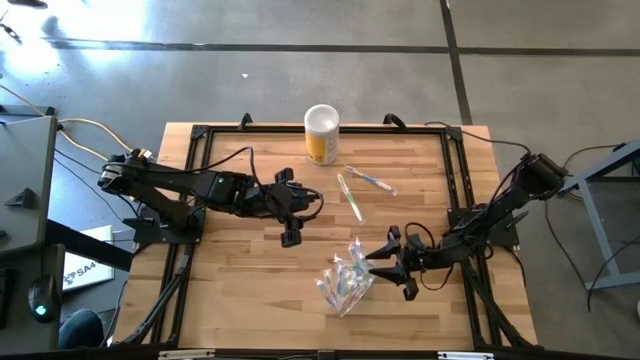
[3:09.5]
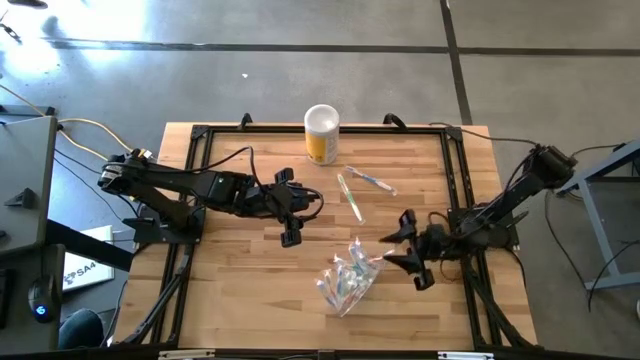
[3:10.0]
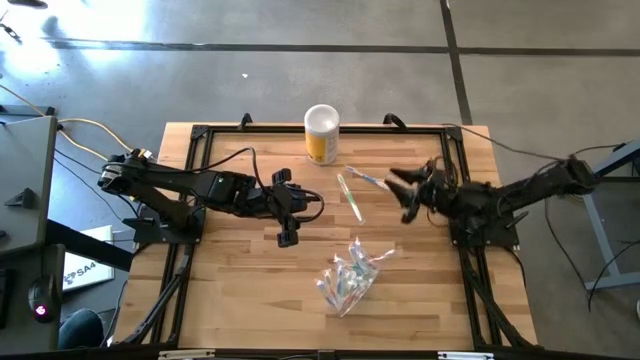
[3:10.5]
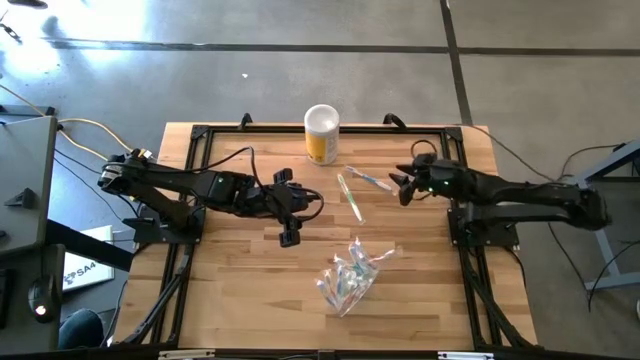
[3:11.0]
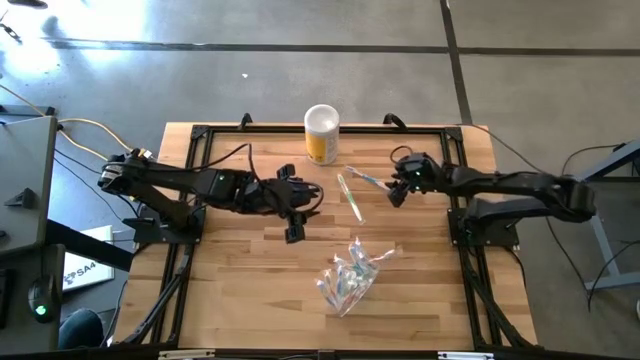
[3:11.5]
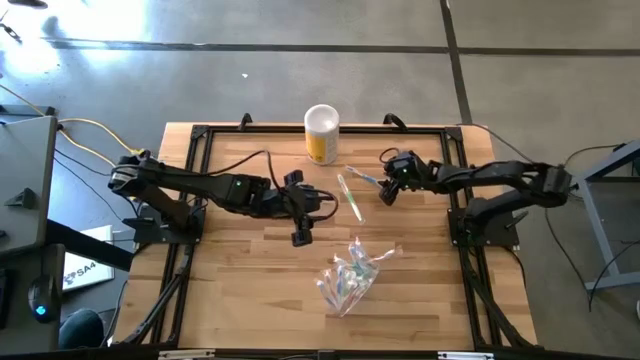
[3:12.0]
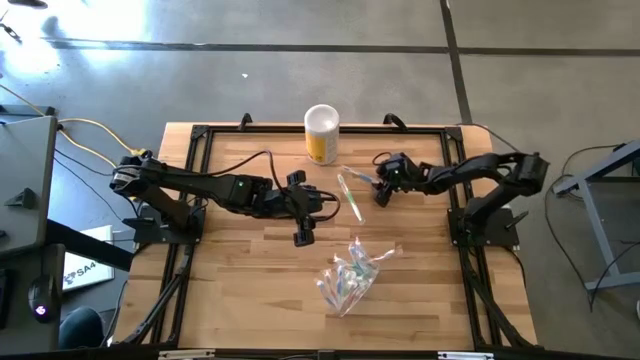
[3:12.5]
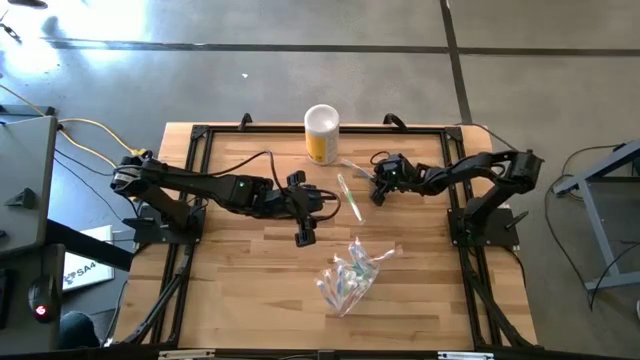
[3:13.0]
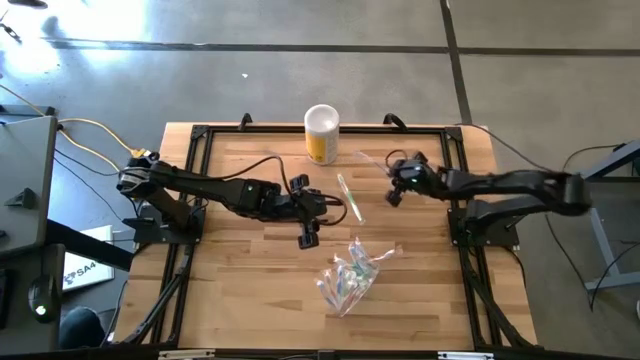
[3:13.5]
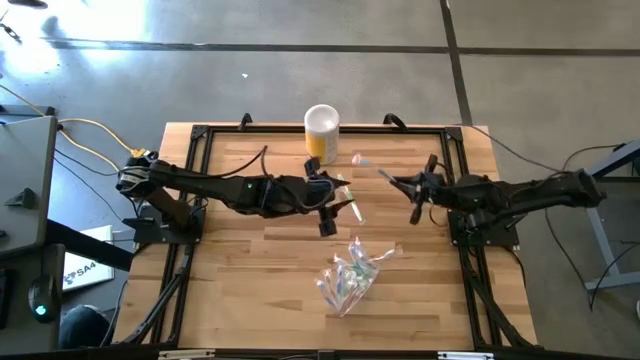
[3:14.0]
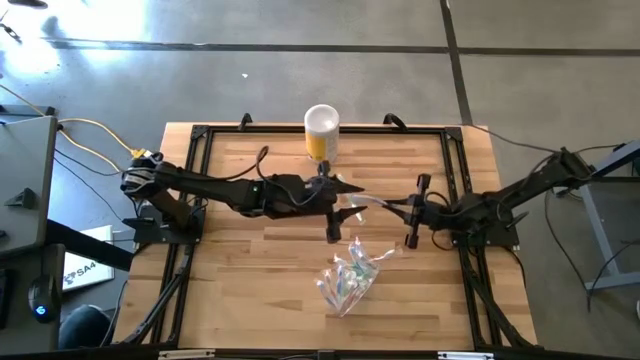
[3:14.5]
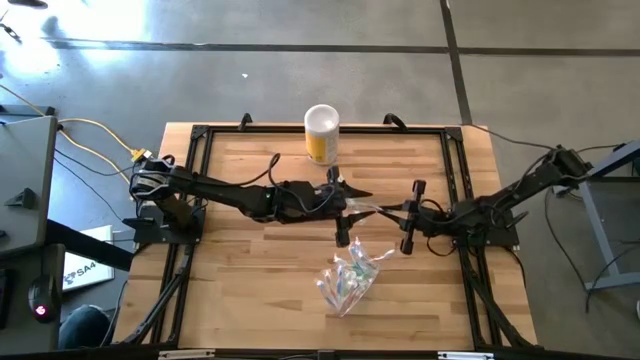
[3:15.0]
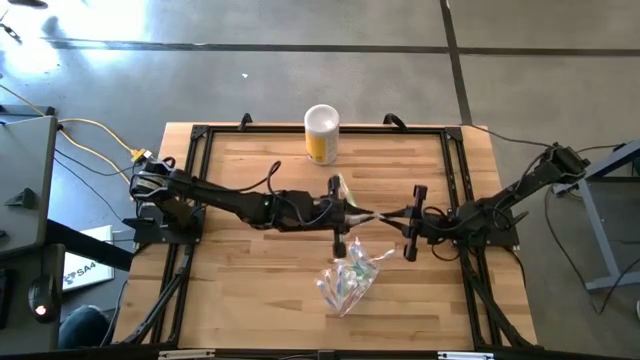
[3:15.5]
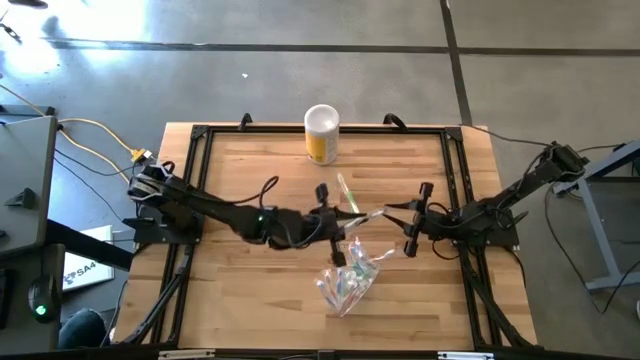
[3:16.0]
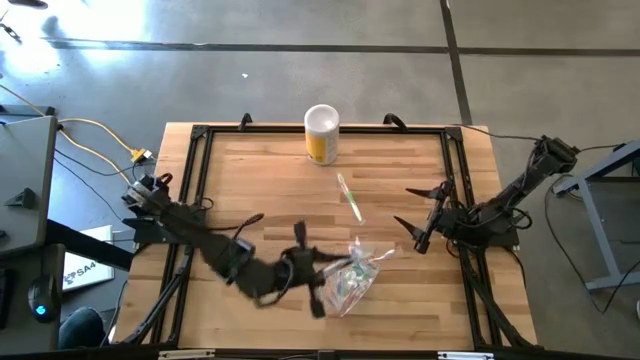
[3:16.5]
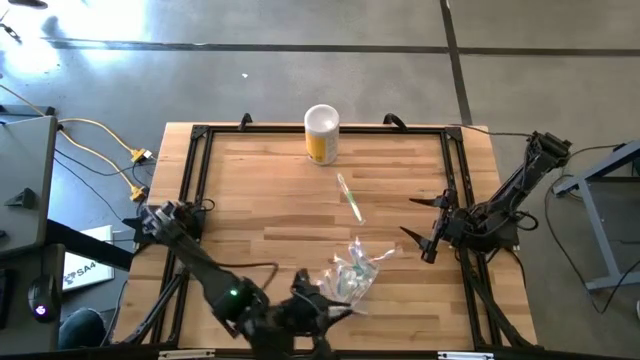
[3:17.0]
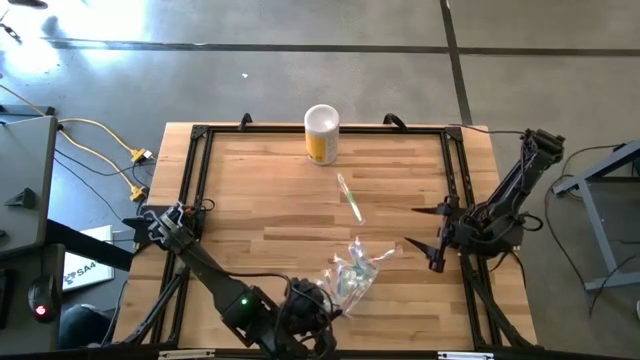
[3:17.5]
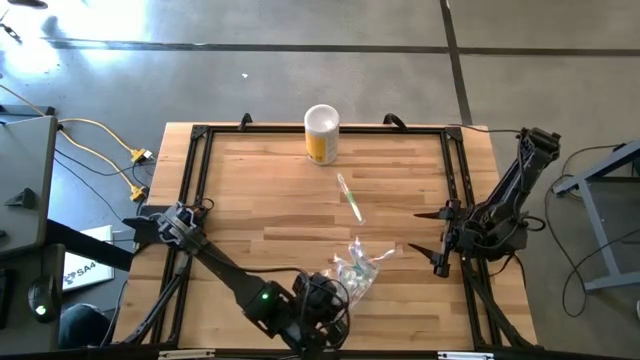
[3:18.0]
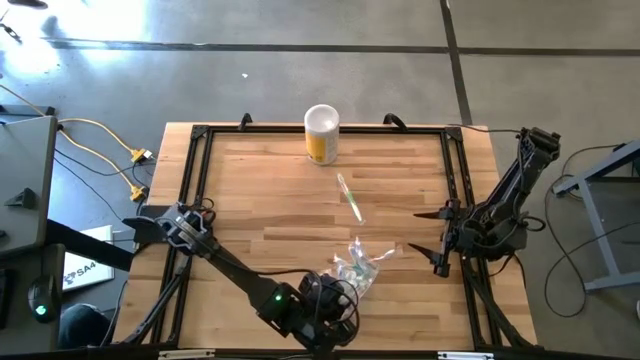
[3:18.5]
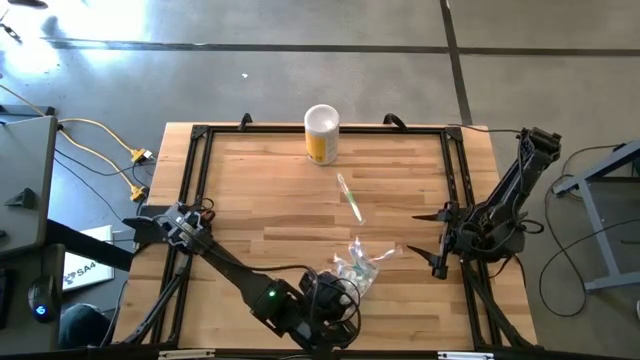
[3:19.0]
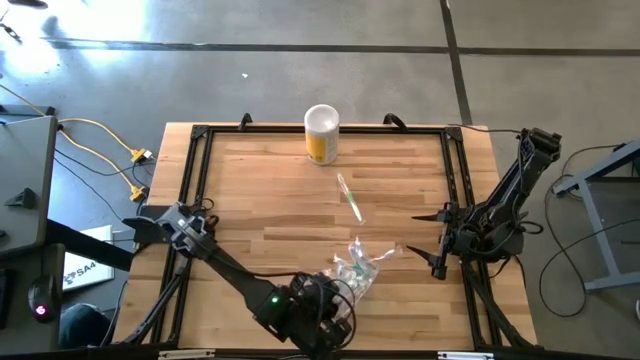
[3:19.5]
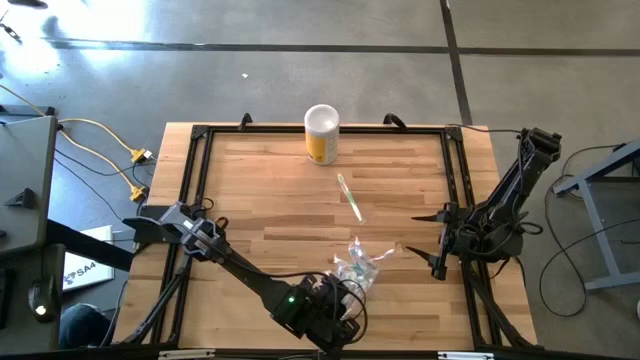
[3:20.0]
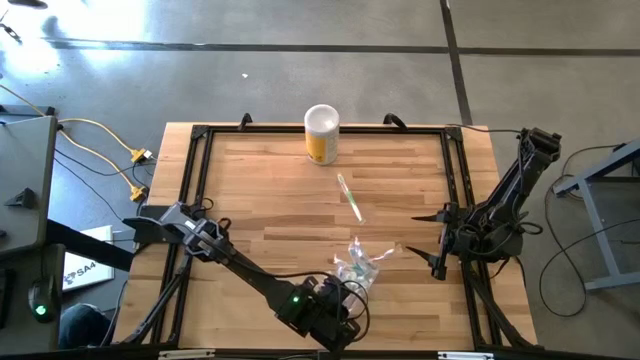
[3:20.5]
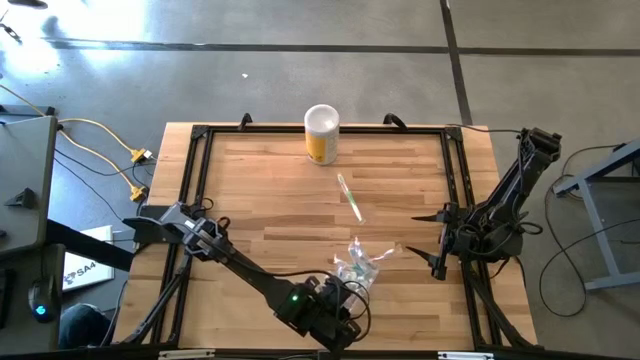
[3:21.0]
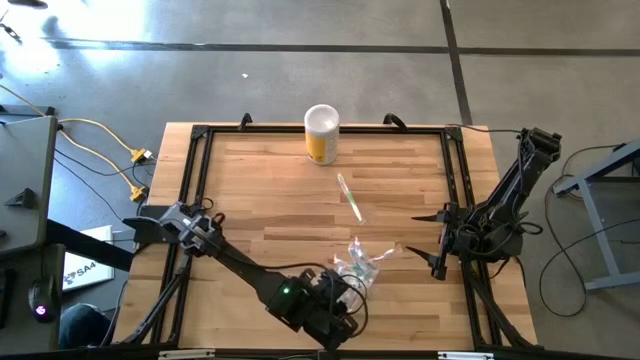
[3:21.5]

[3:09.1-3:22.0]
Task: Pick & Place toothbrushing station
Put the blue toothbrush in the transparent organizer

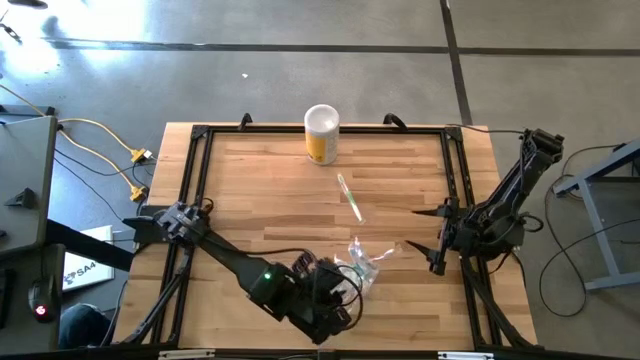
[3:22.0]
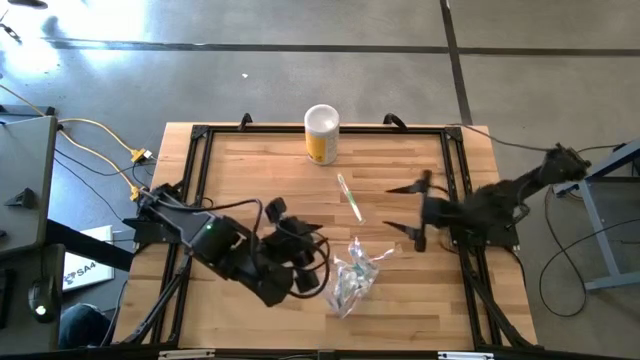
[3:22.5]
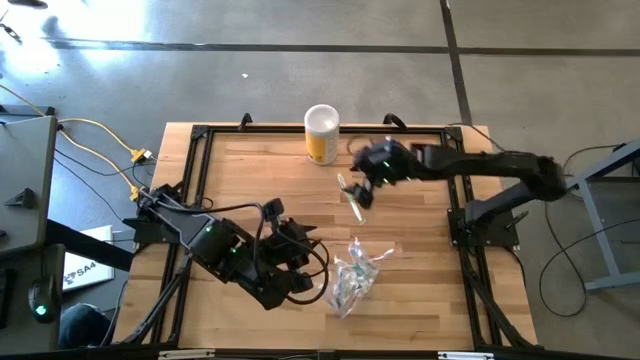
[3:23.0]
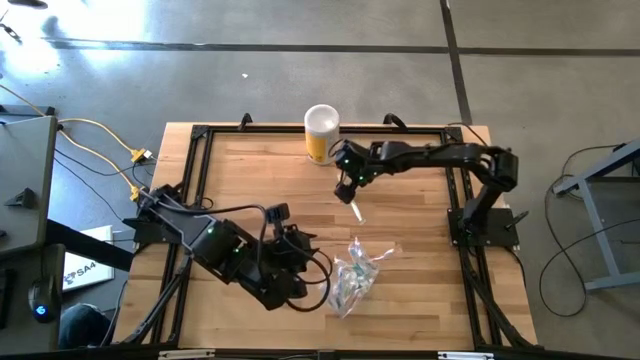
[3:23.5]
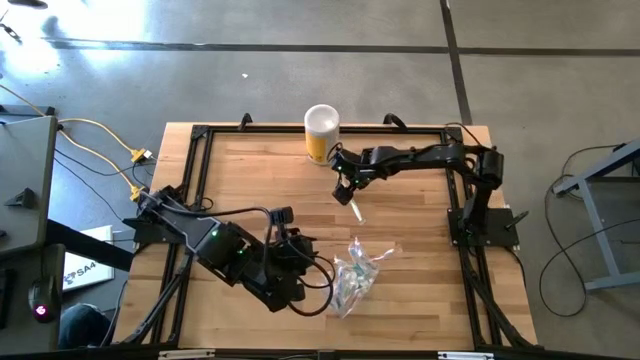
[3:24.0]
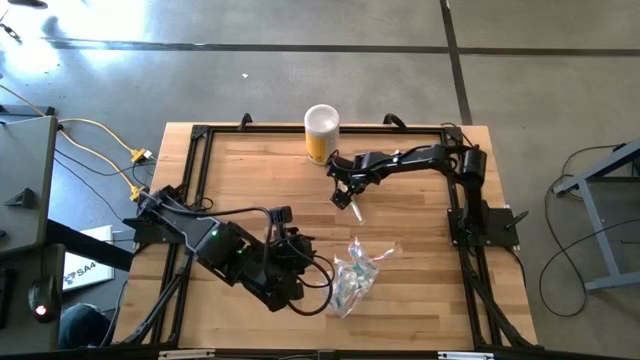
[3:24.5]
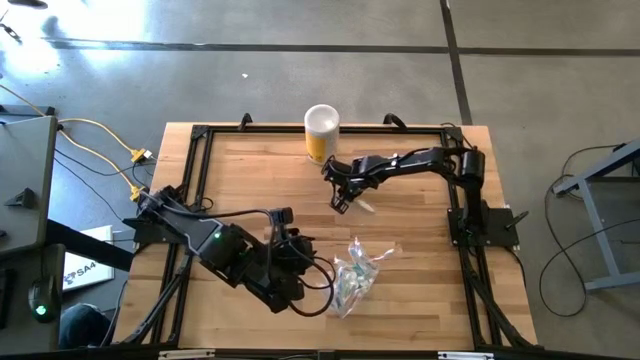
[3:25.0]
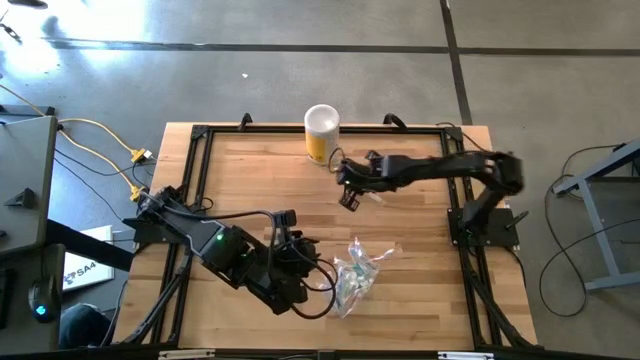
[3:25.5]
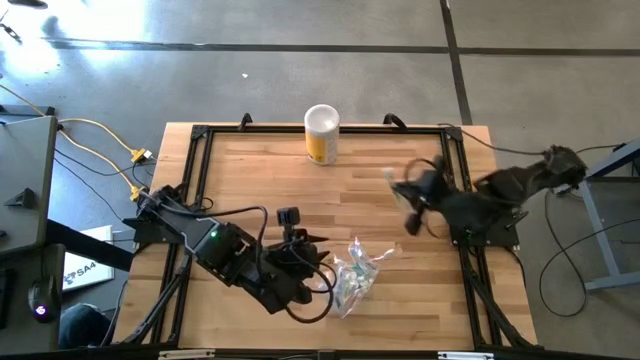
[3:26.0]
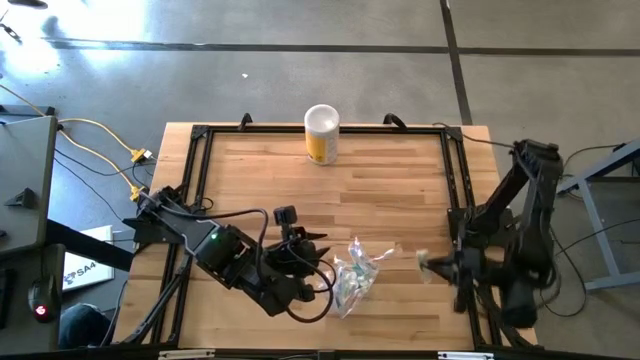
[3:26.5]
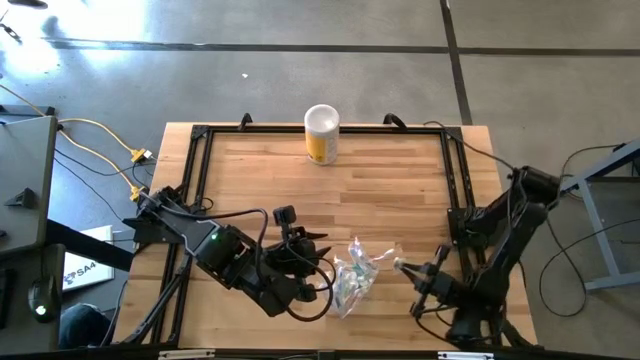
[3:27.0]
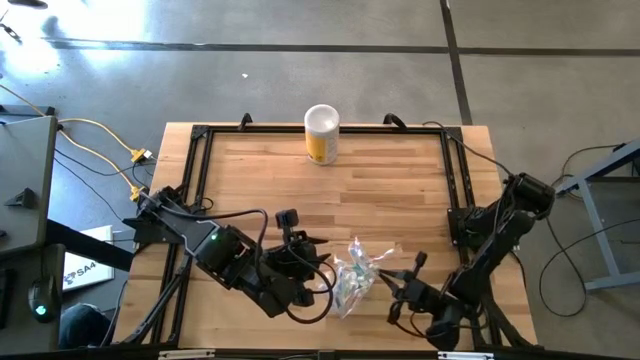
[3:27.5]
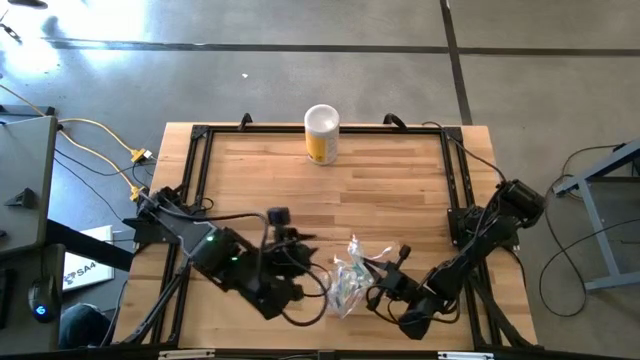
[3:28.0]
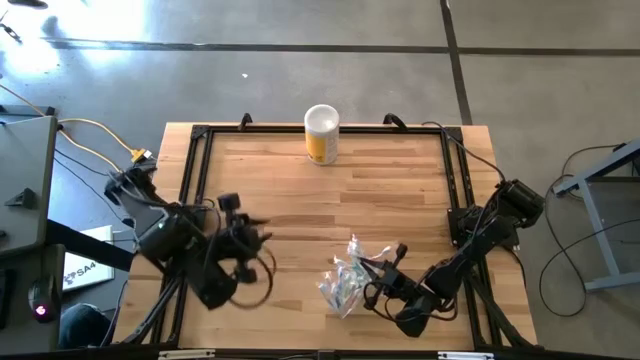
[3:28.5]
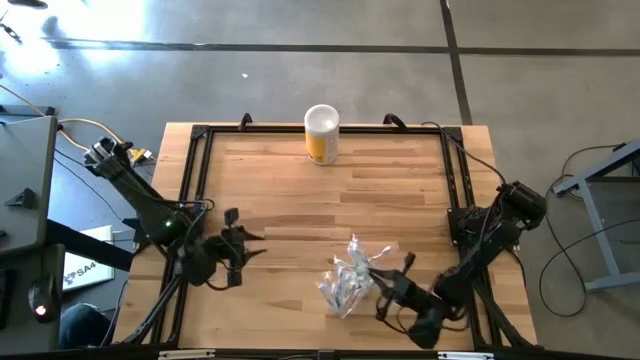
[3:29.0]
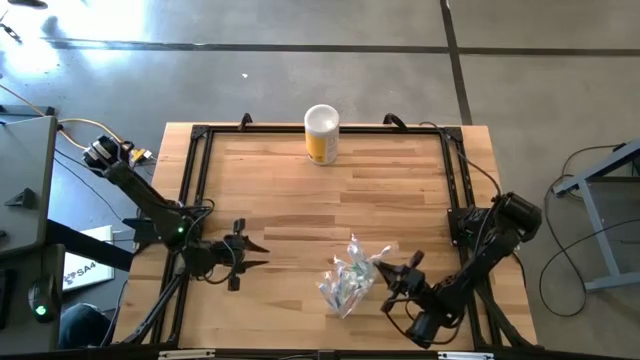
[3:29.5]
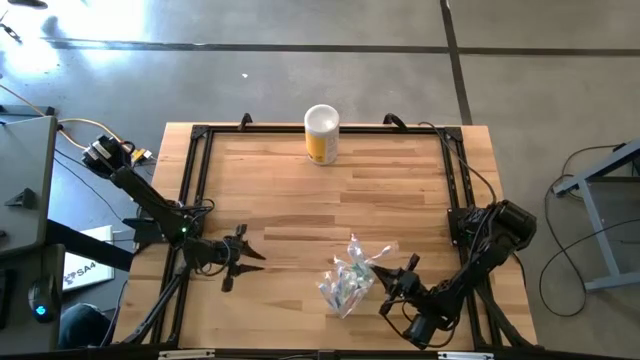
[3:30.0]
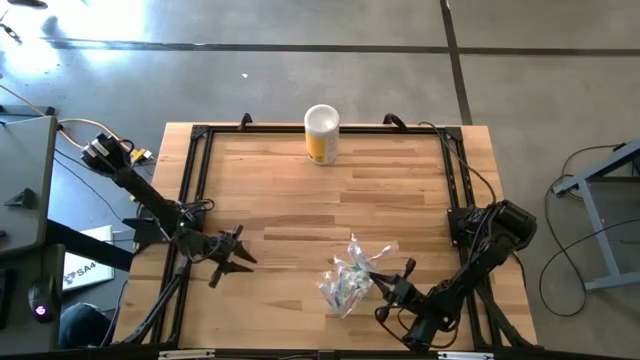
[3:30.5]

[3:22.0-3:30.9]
Put the green toothbrush in the transparent organizer
